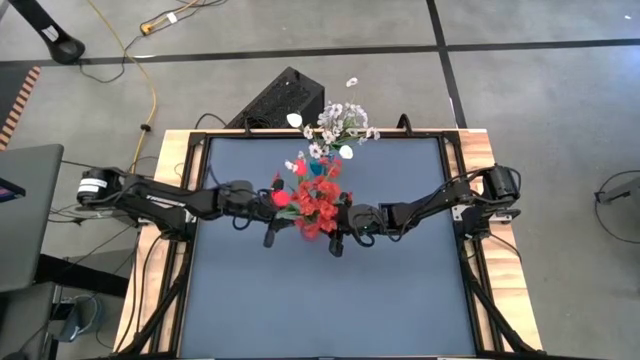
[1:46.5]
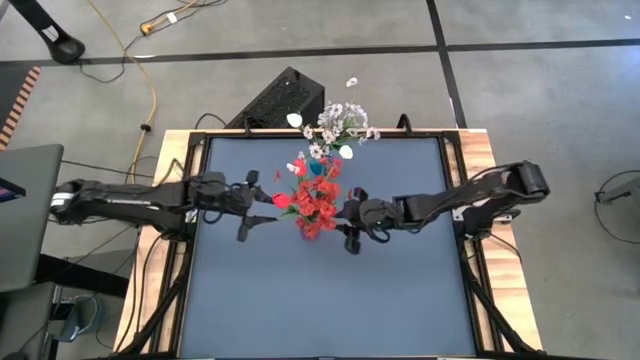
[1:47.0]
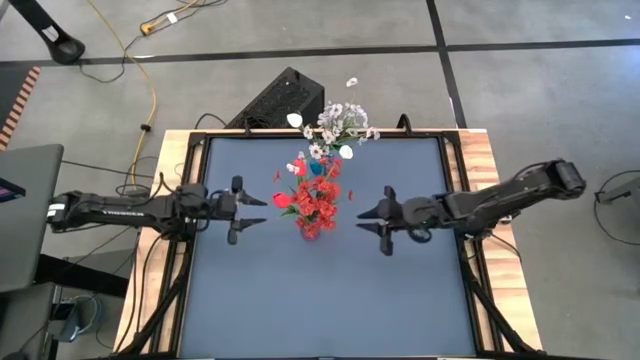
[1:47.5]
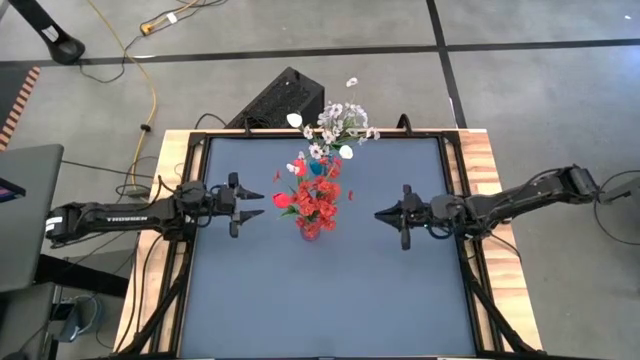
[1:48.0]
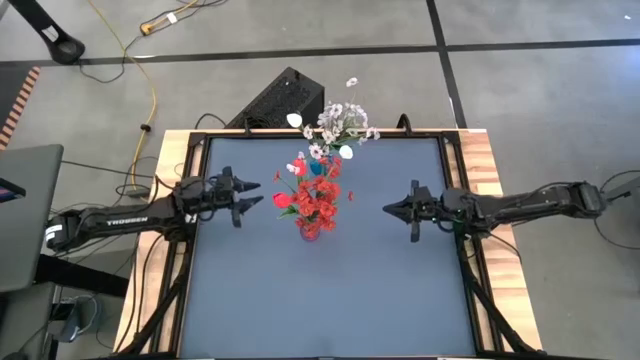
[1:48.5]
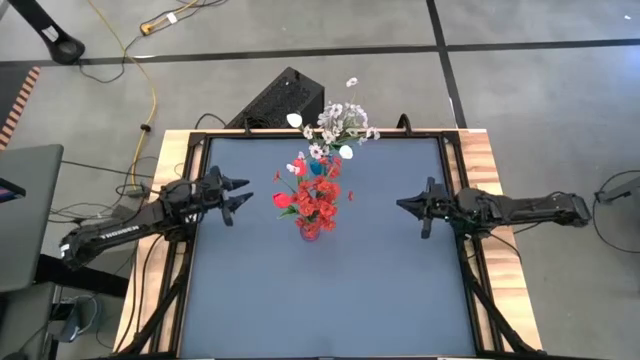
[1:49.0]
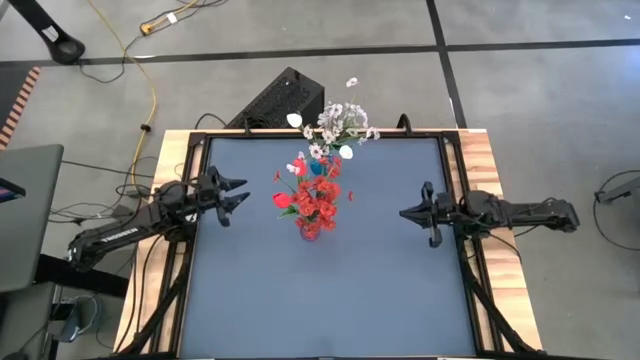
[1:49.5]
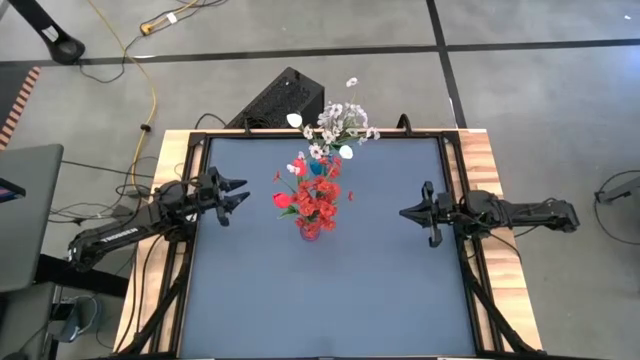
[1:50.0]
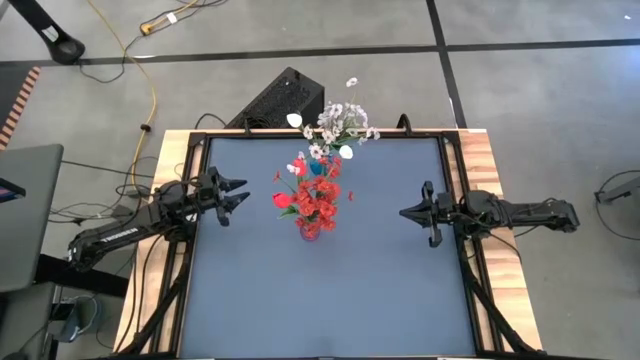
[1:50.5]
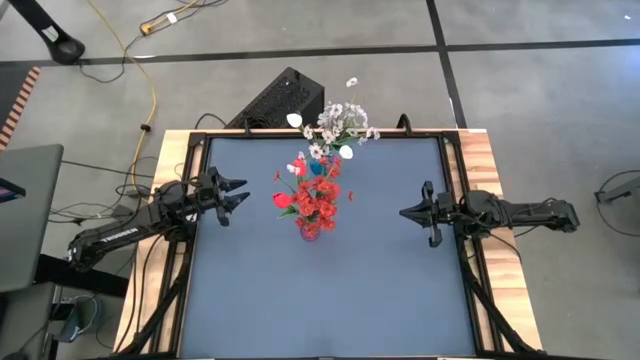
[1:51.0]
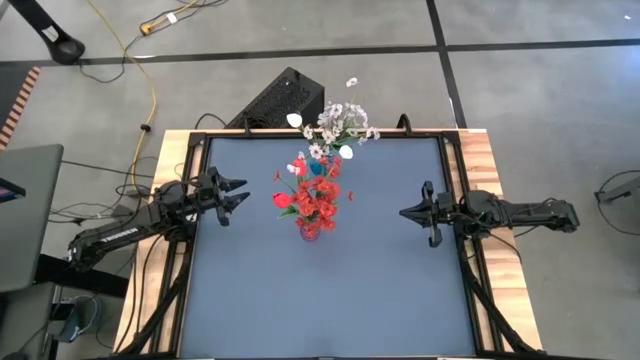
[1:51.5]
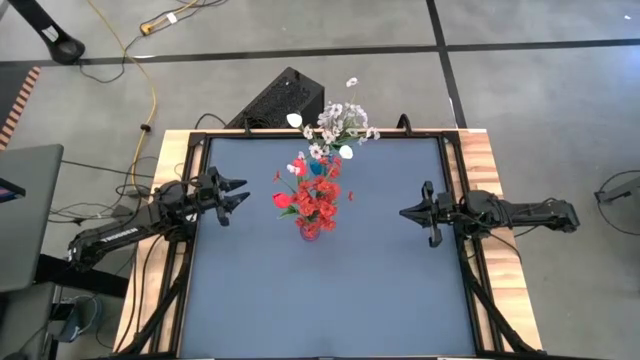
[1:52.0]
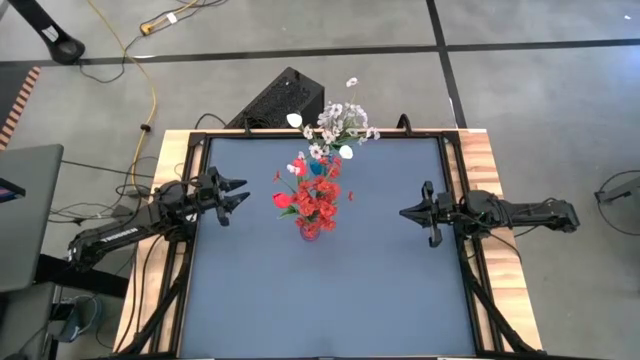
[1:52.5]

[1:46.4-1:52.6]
Task: Sort flowers into vase by color
Return to Home Position

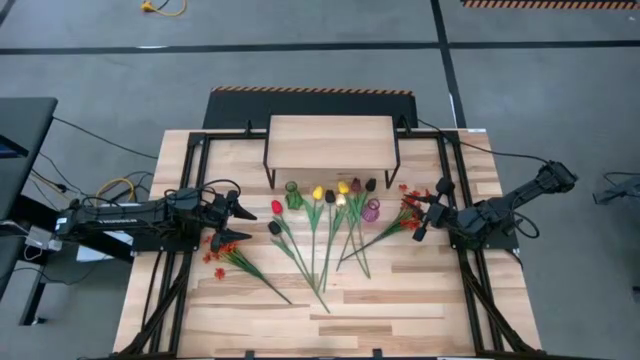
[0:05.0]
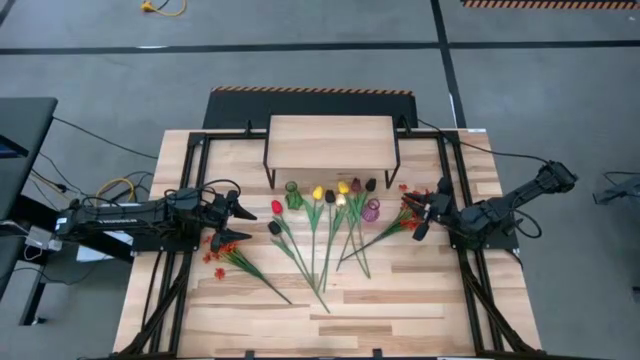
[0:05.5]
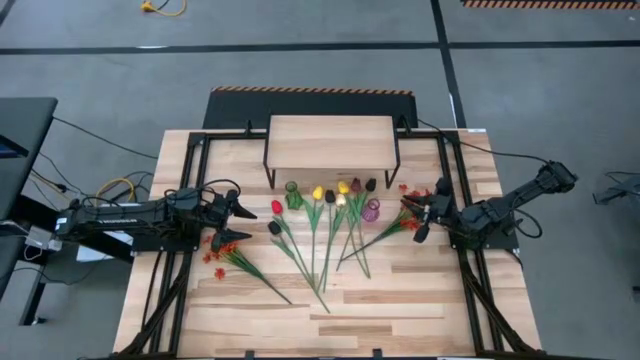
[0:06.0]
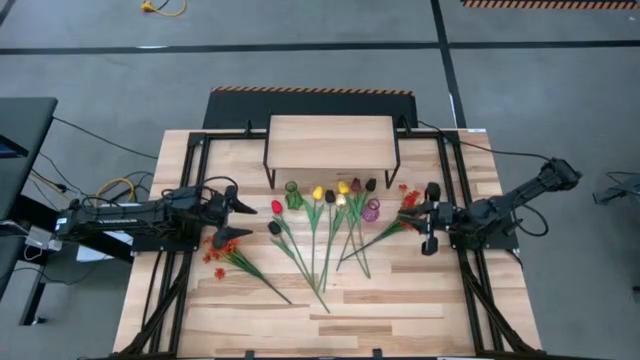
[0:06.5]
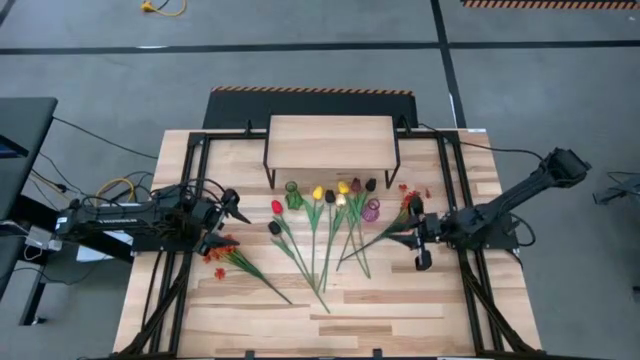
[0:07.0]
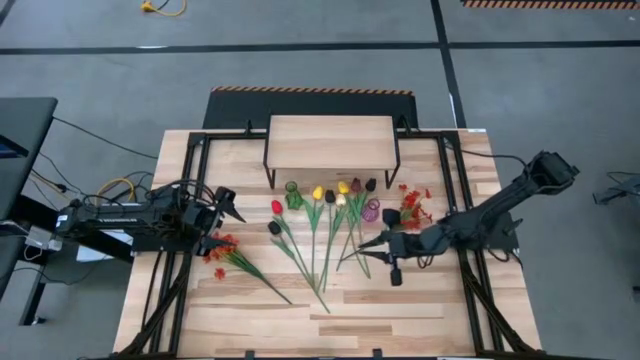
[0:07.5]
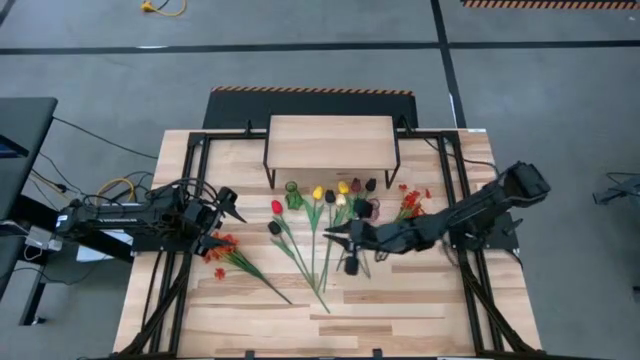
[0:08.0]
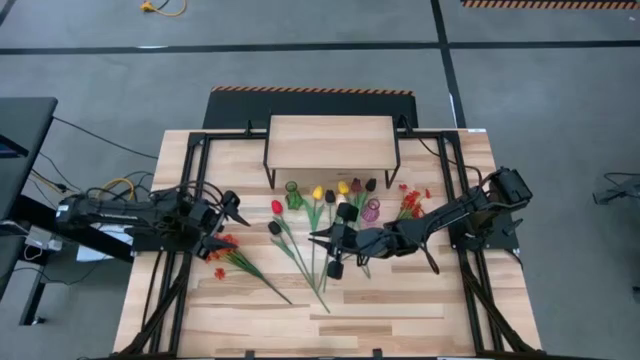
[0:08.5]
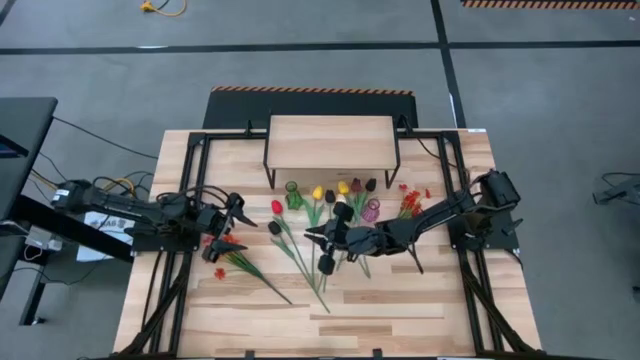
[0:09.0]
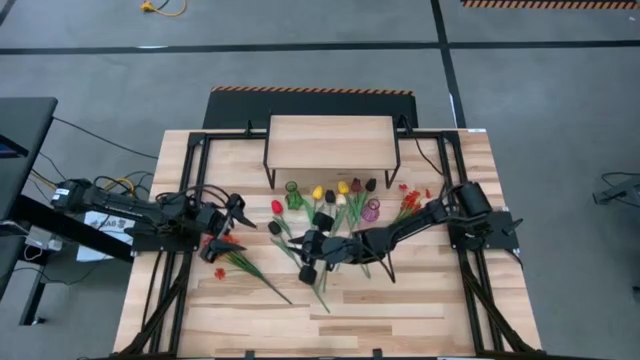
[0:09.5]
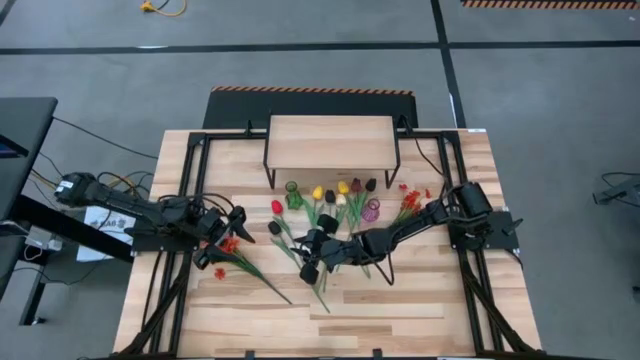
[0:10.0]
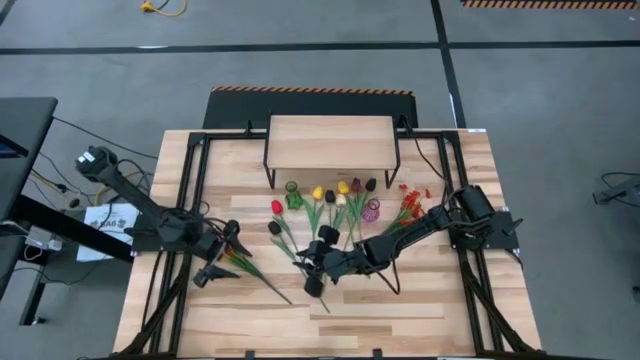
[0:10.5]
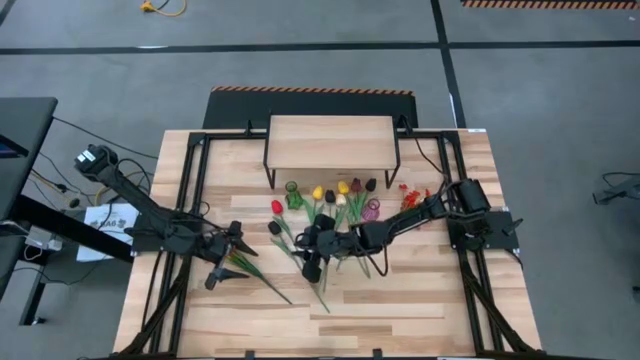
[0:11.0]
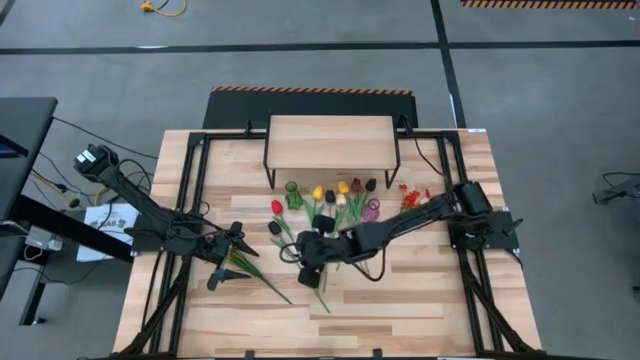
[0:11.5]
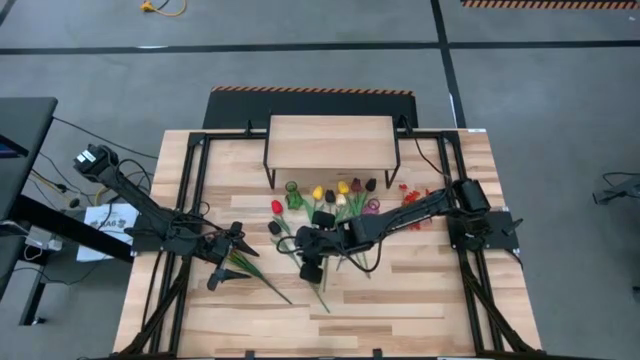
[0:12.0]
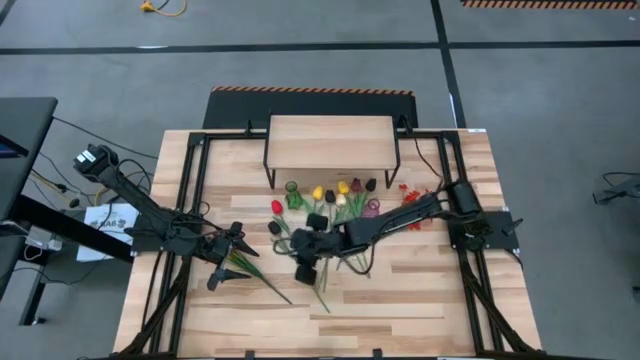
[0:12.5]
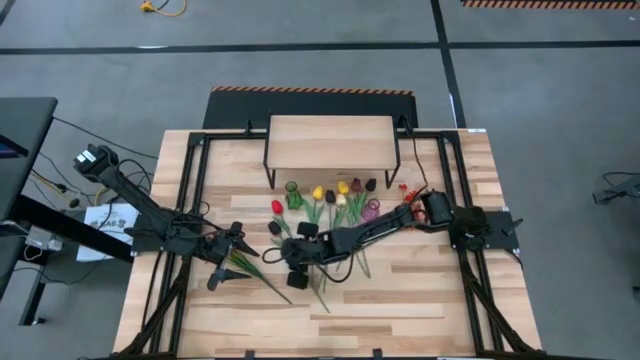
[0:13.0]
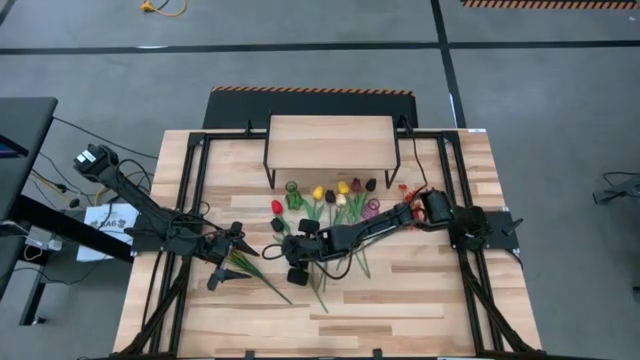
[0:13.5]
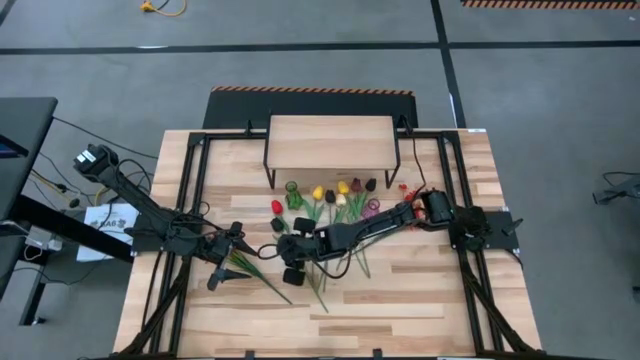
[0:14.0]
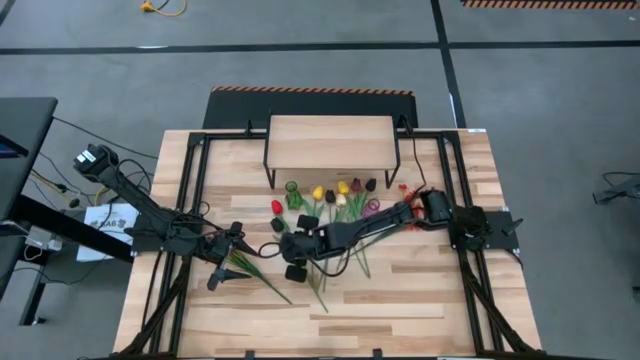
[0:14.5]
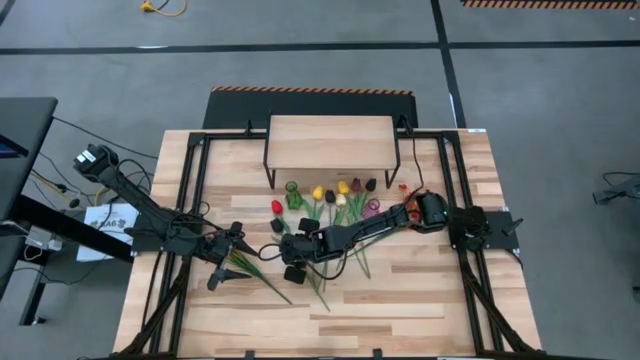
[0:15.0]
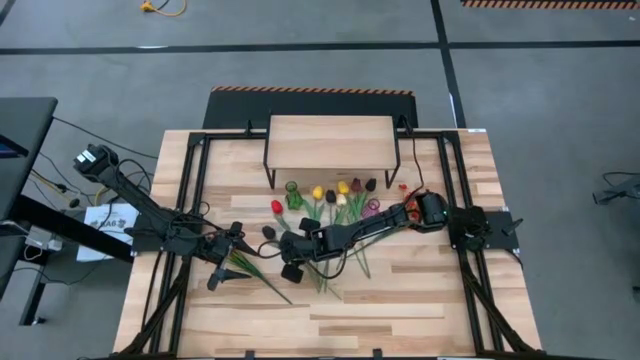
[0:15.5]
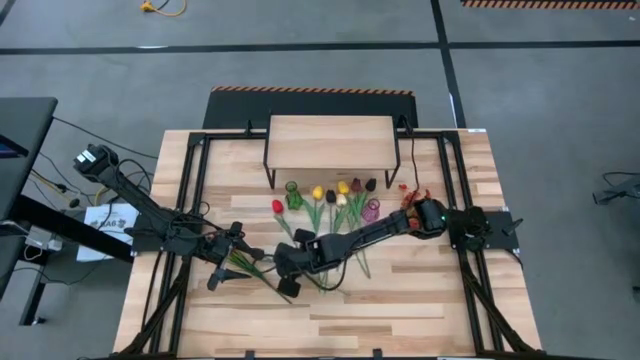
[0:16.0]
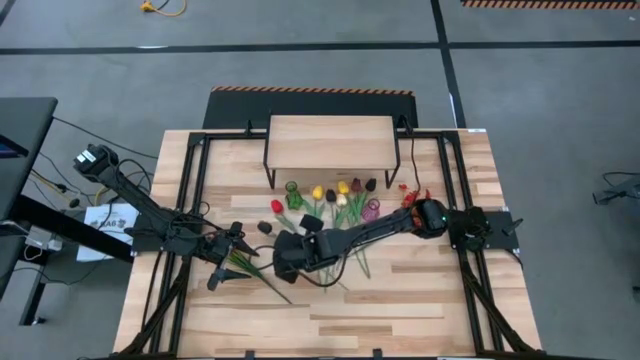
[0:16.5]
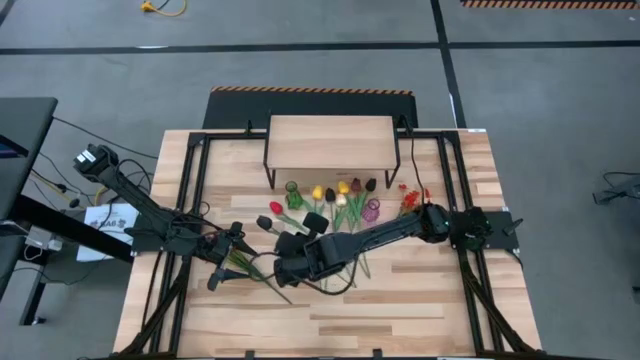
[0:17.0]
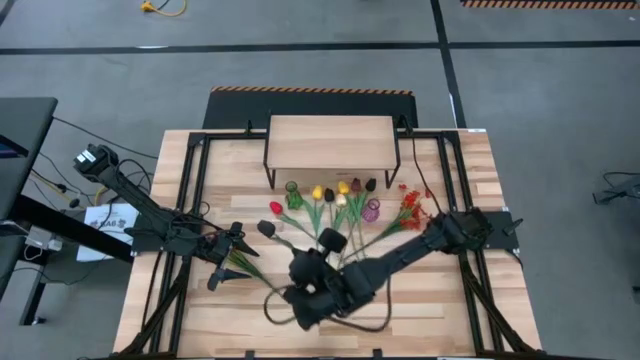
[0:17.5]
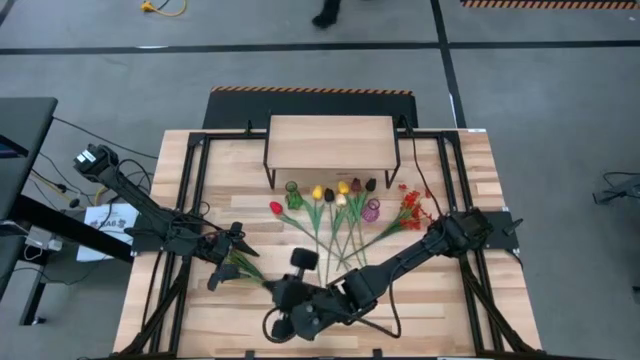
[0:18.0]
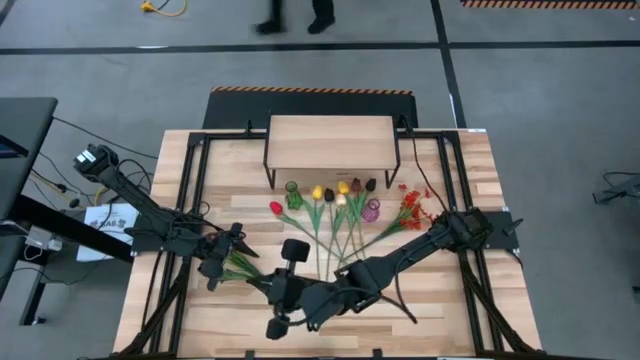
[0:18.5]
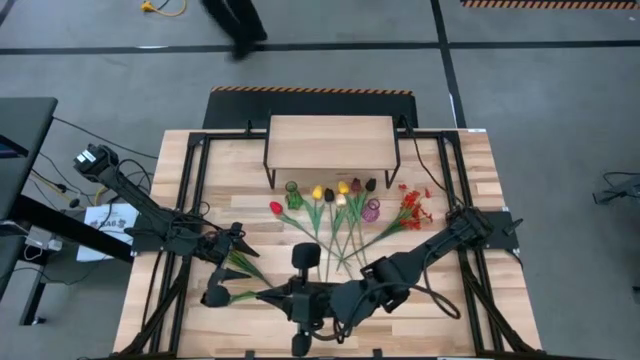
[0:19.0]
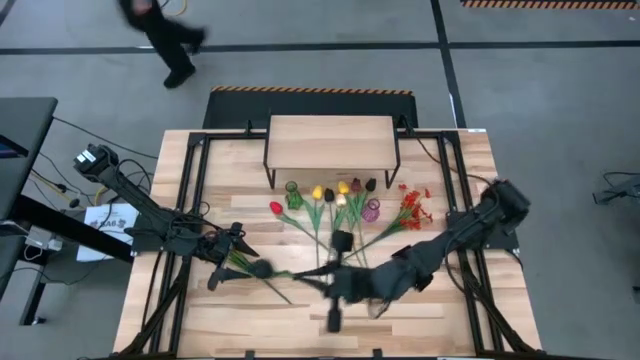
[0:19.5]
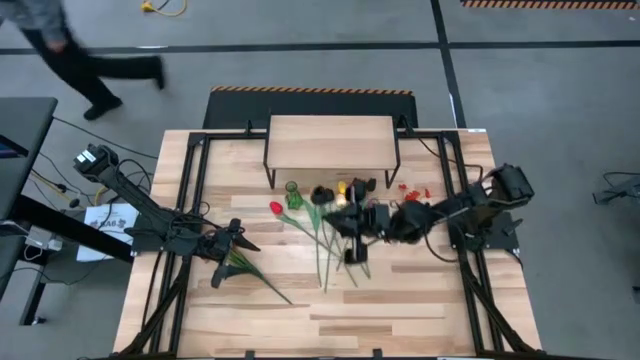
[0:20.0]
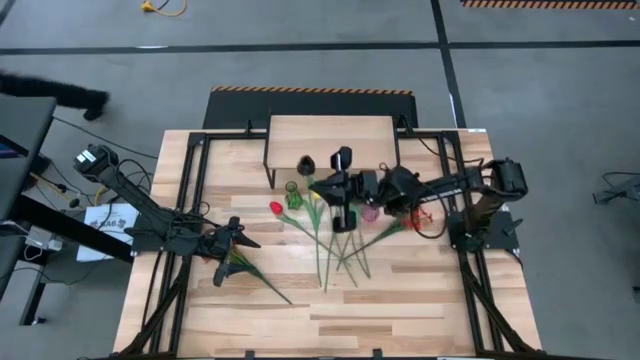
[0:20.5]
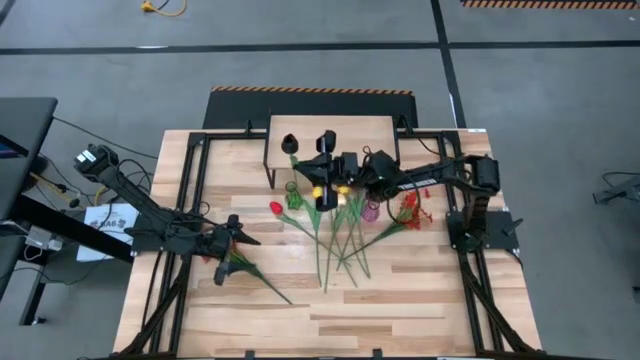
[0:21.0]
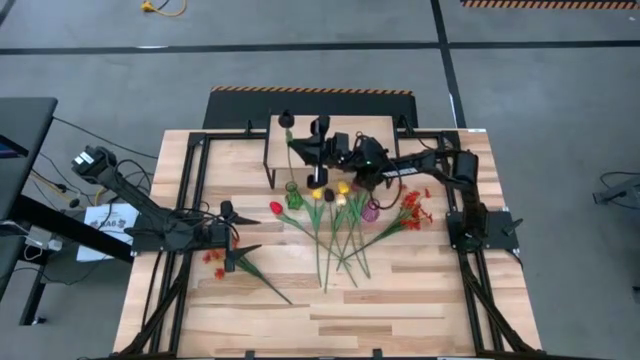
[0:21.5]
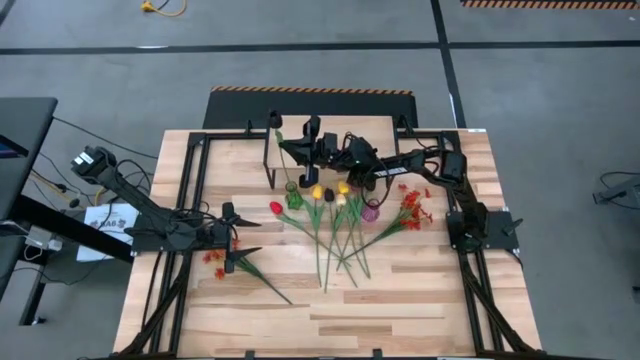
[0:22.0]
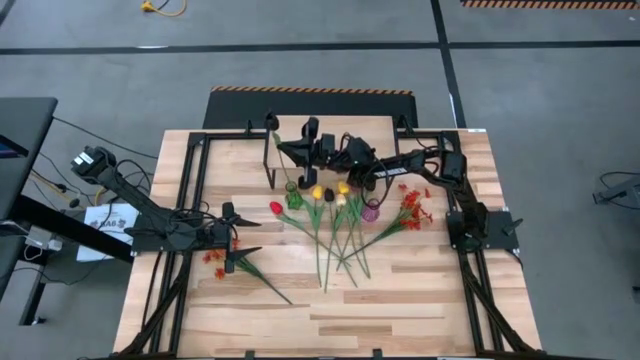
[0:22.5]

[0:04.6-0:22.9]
Task: Pick and place flowers into a vace then onto a shelf
Put the bottom black tulip into the green vase
